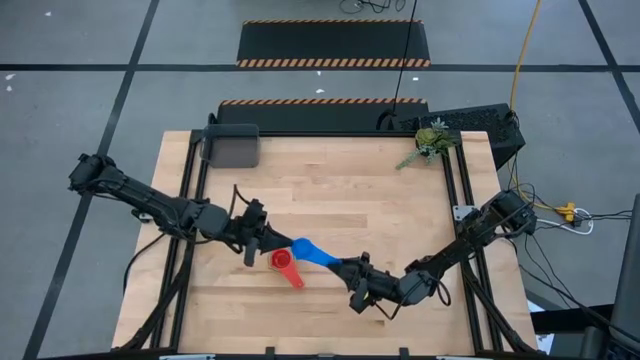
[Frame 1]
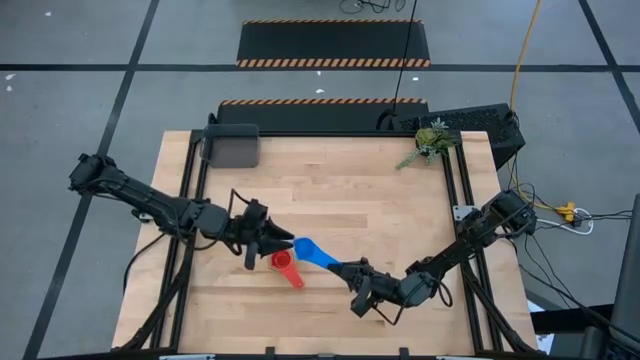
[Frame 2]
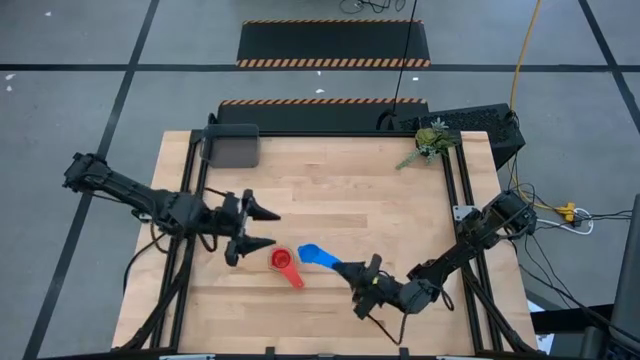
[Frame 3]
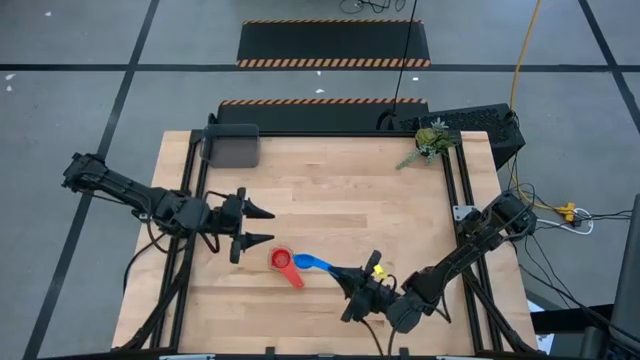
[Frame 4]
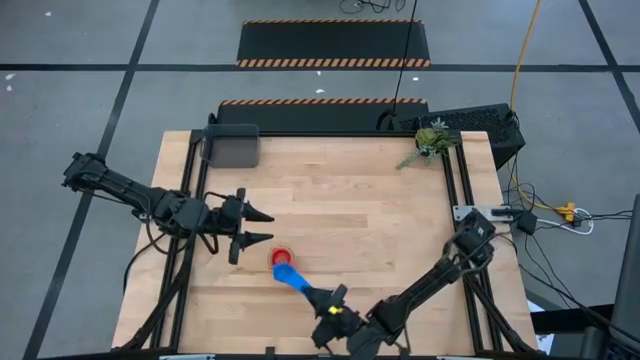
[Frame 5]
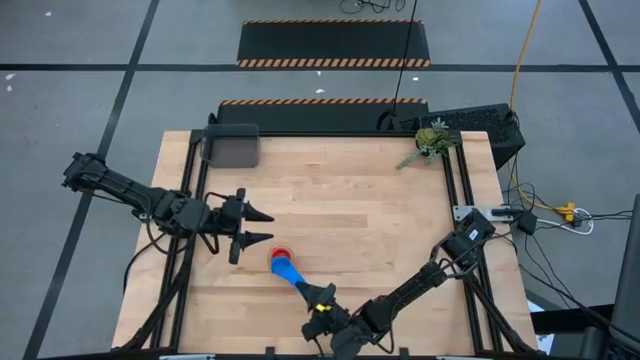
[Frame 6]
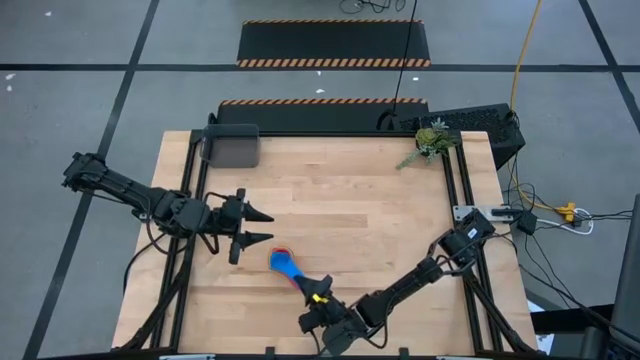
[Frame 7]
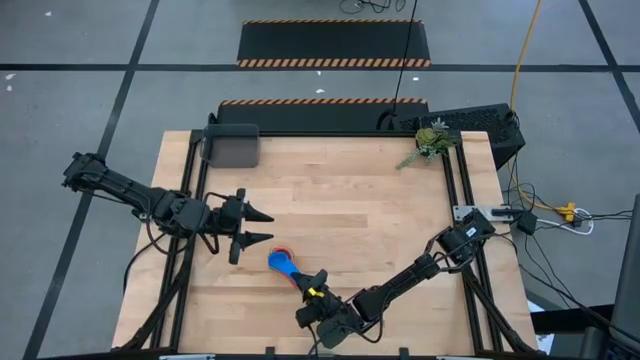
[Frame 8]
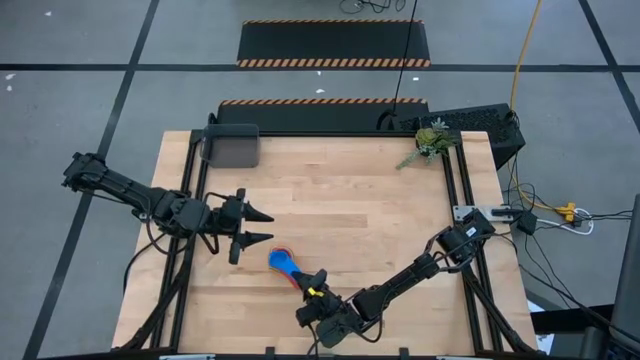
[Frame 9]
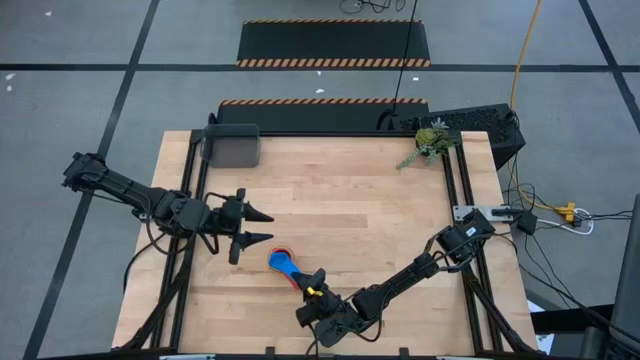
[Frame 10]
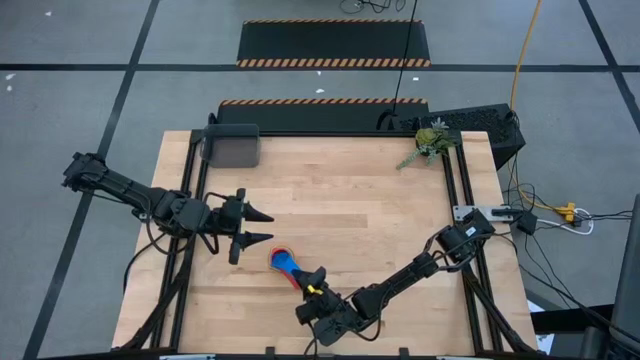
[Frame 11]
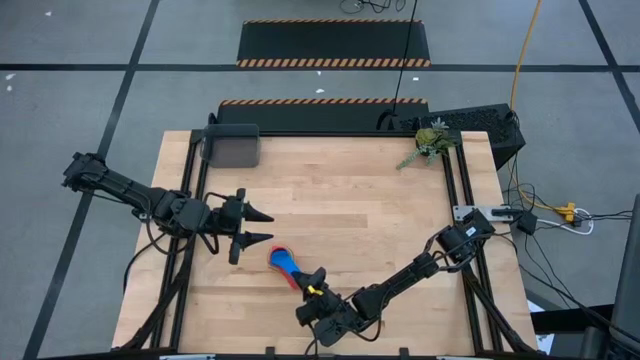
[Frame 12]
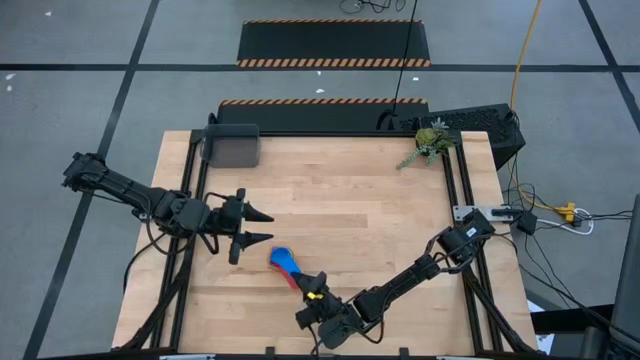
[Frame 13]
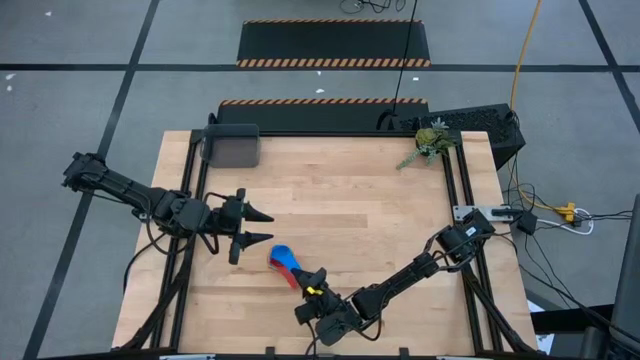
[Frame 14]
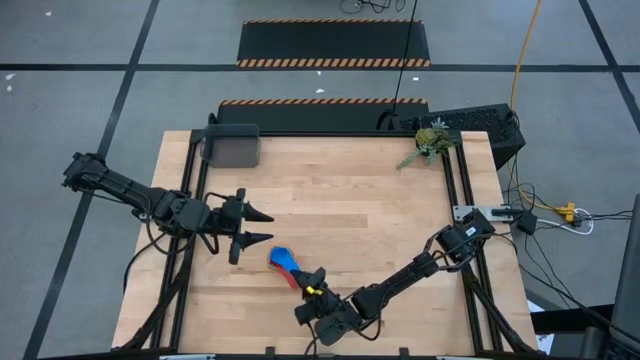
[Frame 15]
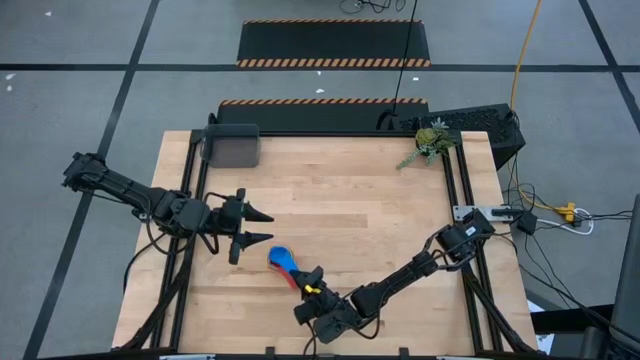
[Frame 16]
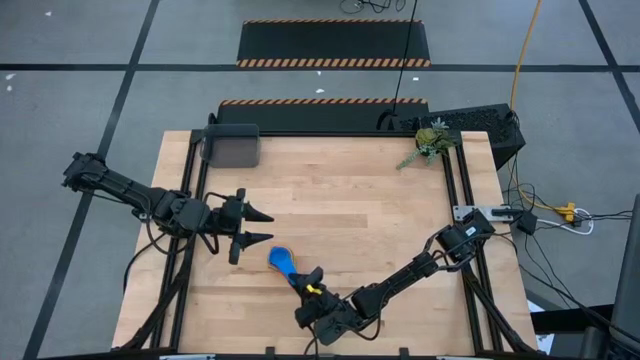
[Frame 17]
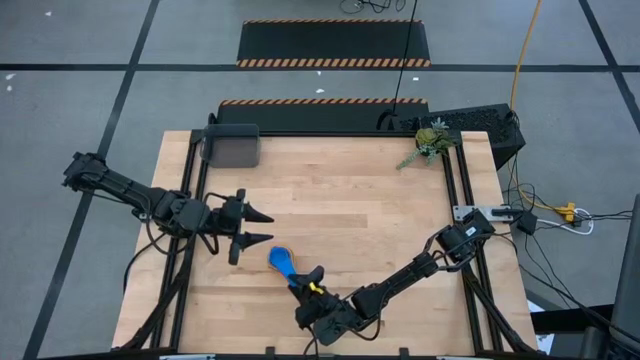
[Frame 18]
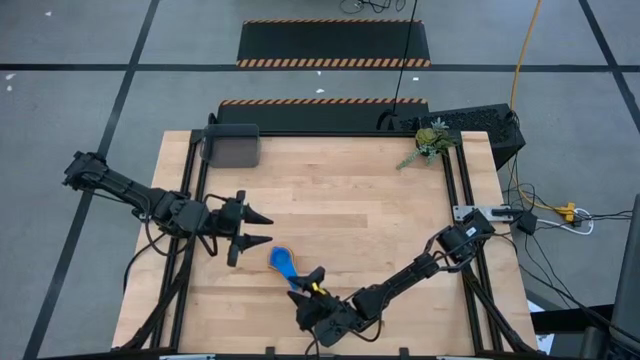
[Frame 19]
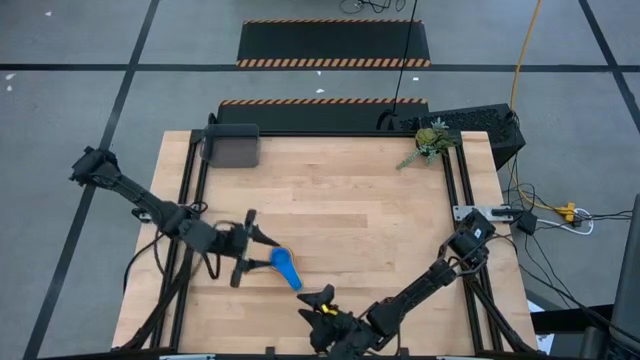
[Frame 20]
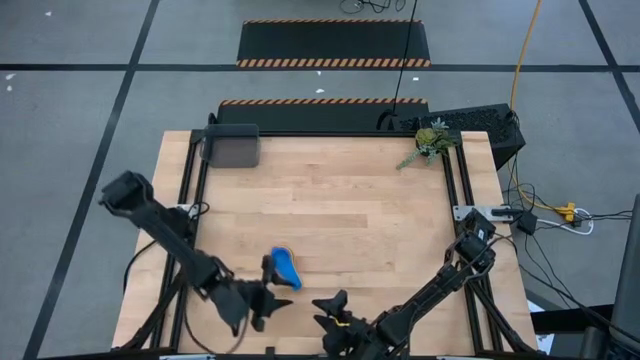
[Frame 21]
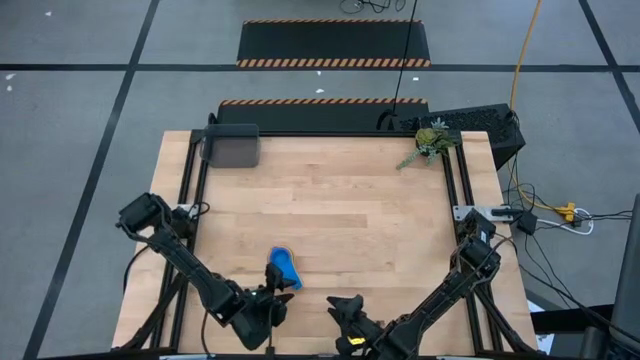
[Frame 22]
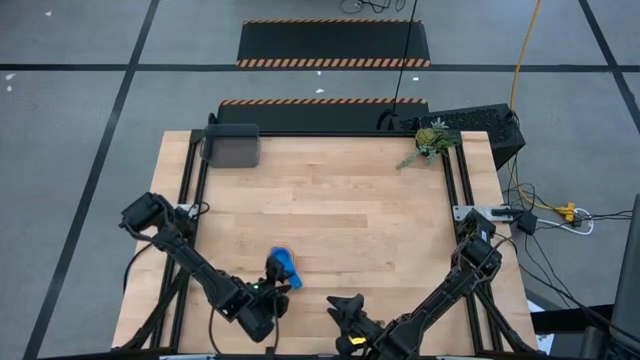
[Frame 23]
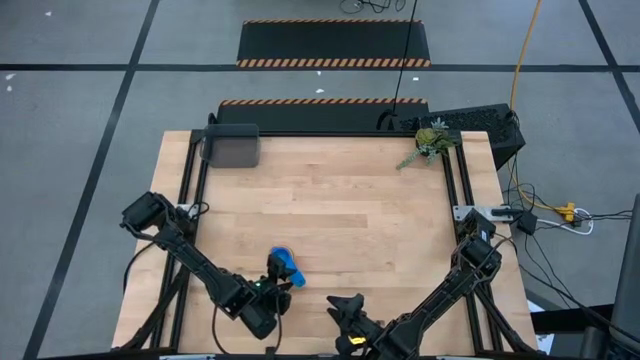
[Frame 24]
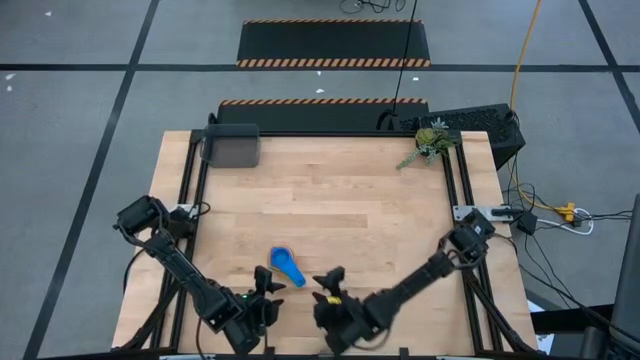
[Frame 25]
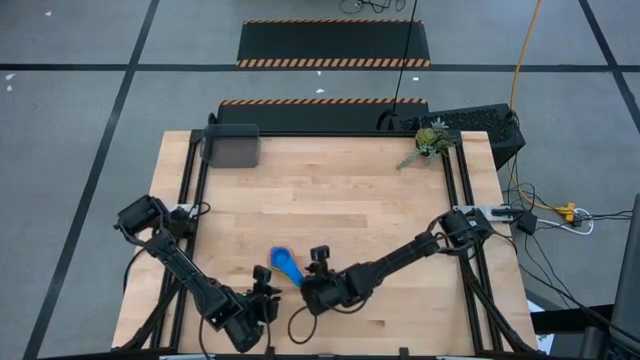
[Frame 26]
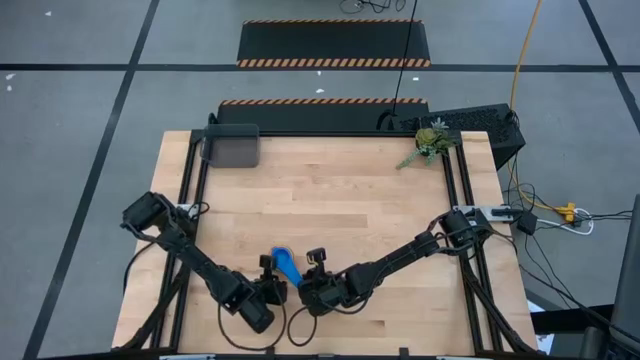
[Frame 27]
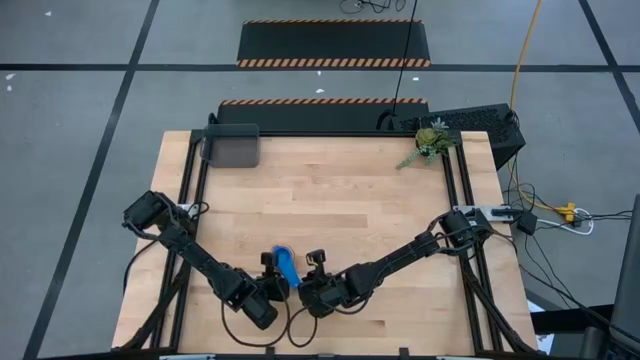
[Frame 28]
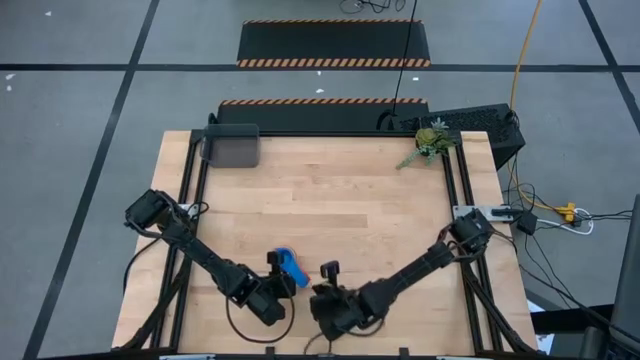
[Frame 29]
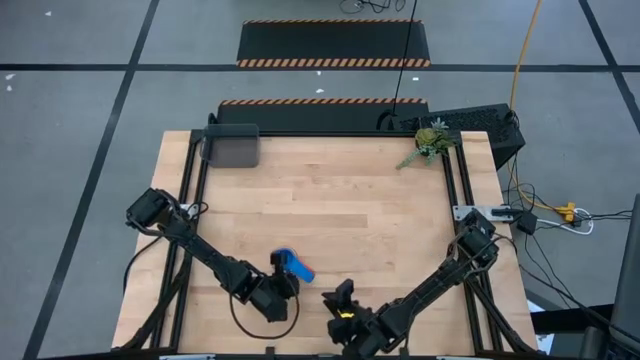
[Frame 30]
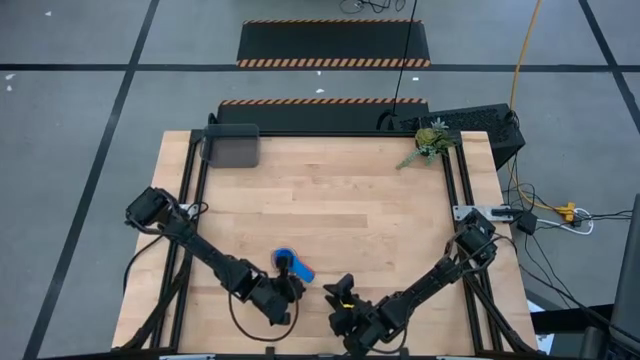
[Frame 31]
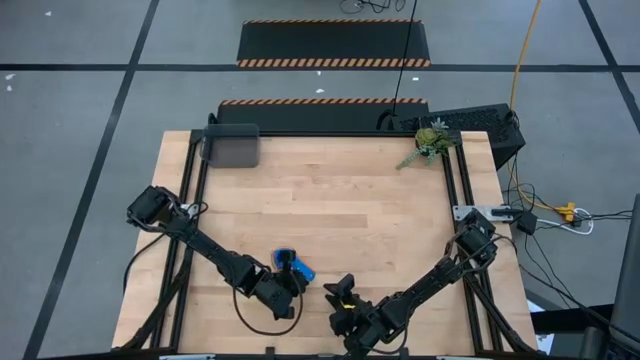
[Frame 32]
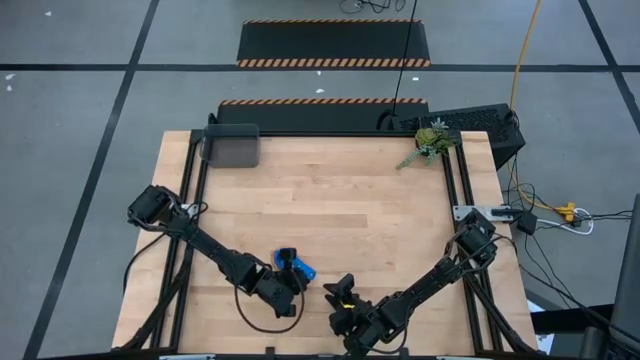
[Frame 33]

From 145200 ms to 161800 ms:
Task: Nest measuring cups in basket
Stack the blue measuring cup on top of the red measuring cup

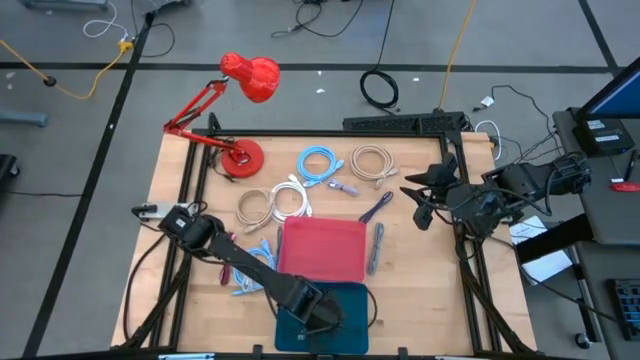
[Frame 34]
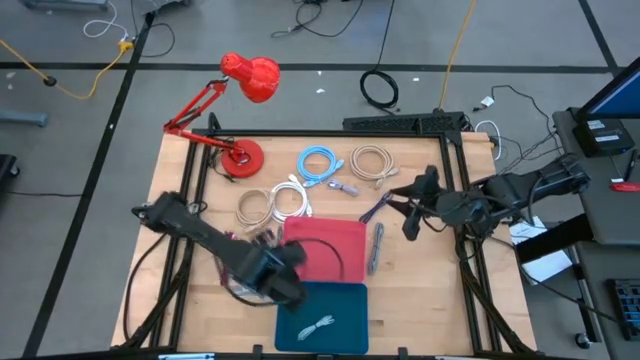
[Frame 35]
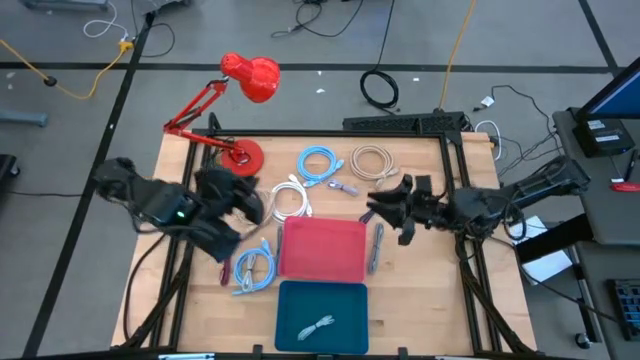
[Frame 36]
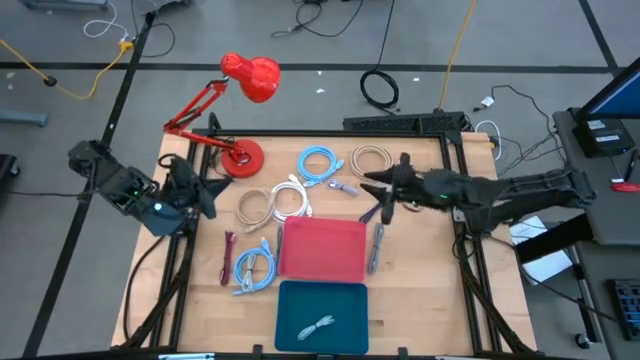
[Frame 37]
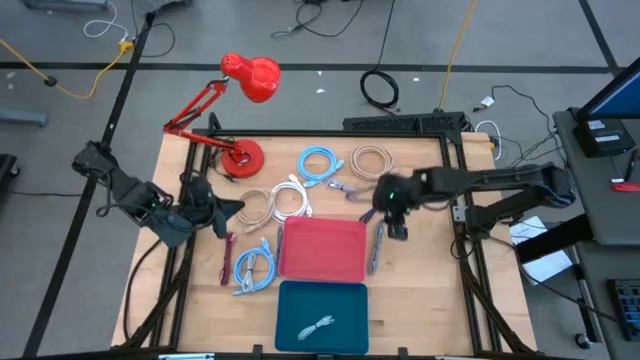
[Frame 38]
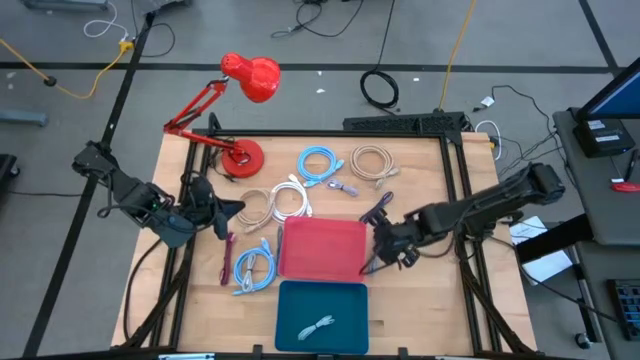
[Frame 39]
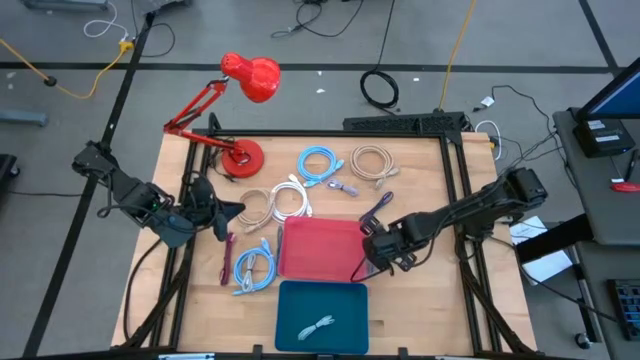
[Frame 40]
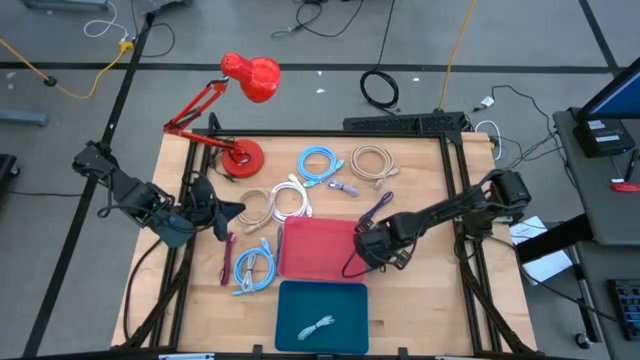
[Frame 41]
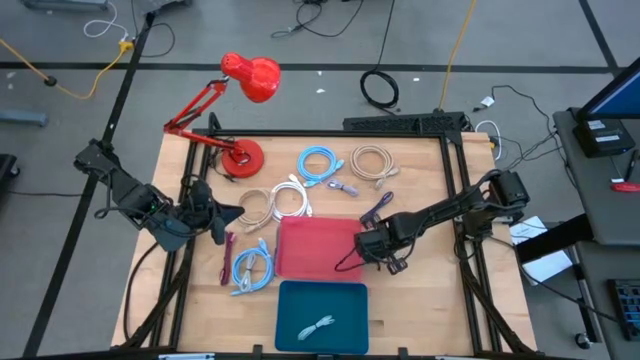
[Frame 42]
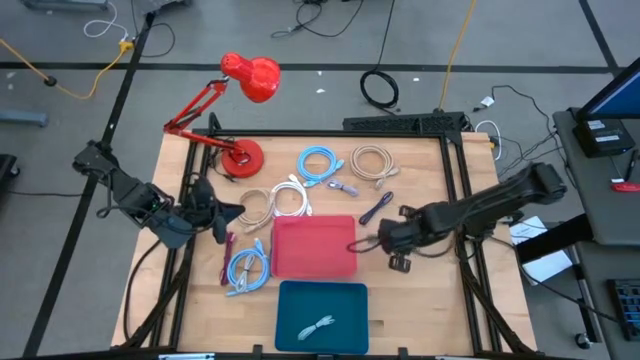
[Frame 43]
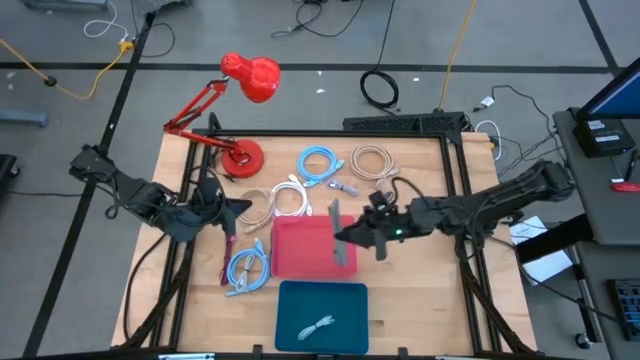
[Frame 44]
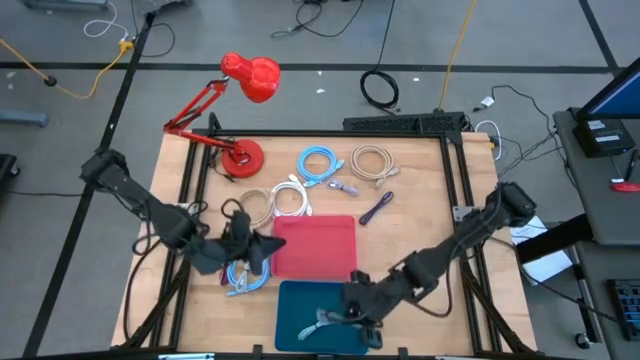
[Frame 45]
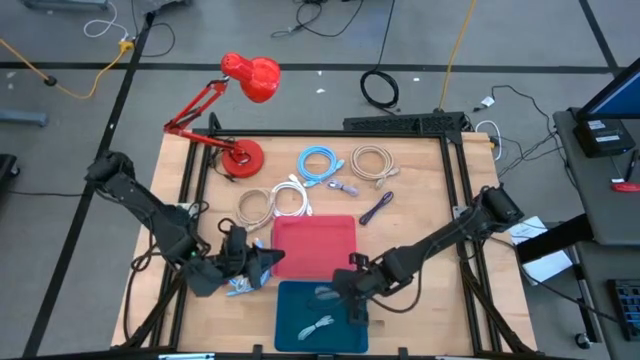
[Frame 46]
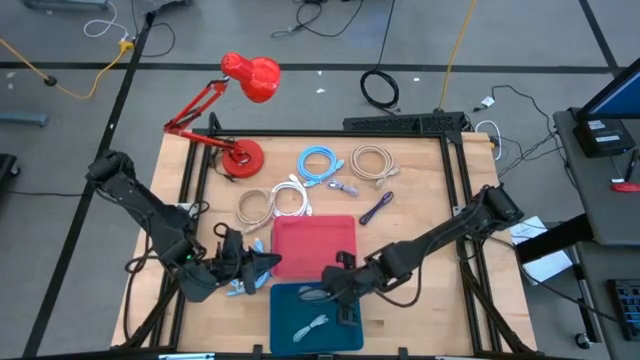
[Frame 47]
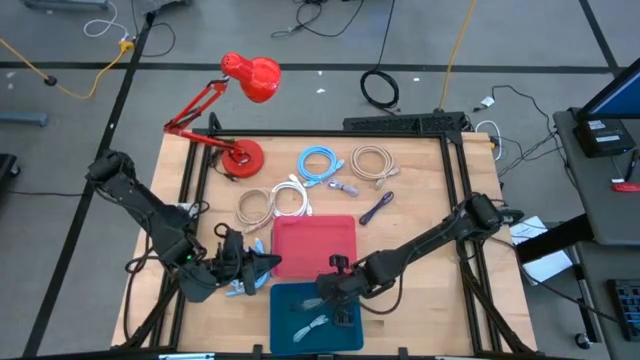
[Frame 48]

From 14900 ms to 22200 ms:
Task: Pick & Place USB Port
Put the white and black charger cable into the blue bin
